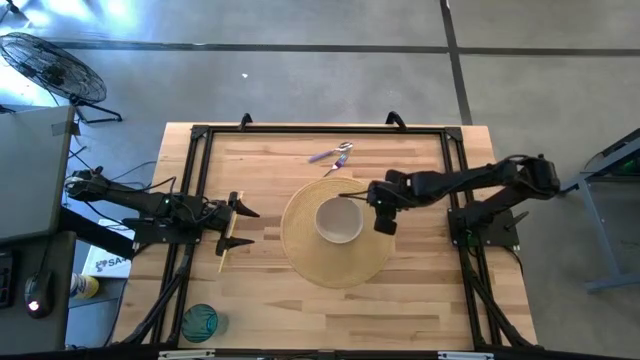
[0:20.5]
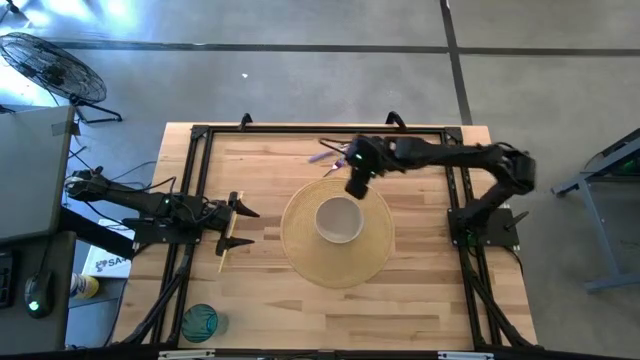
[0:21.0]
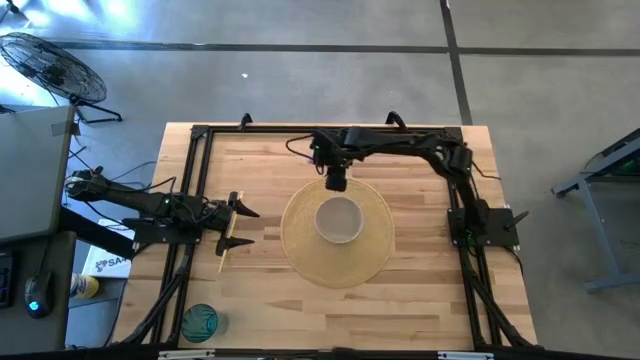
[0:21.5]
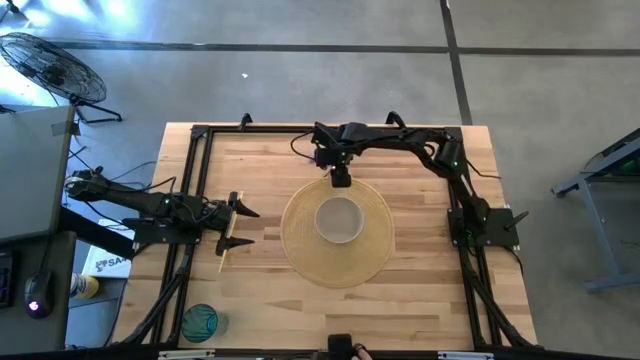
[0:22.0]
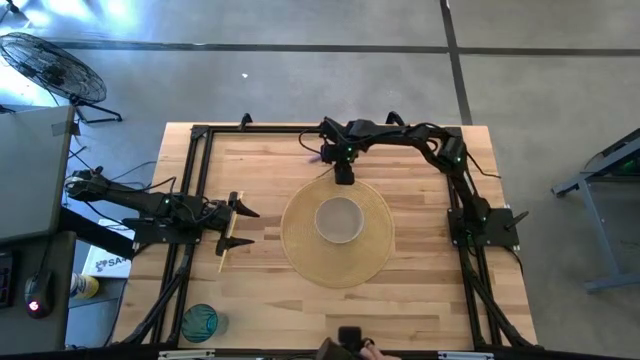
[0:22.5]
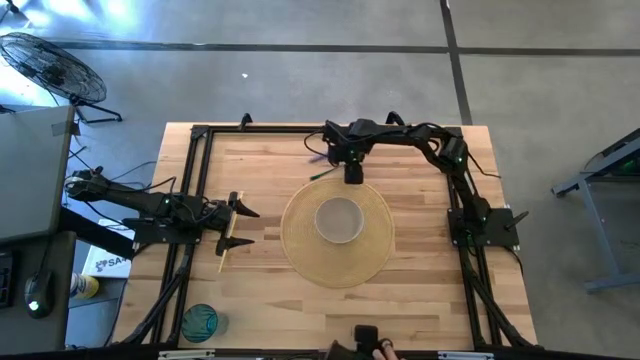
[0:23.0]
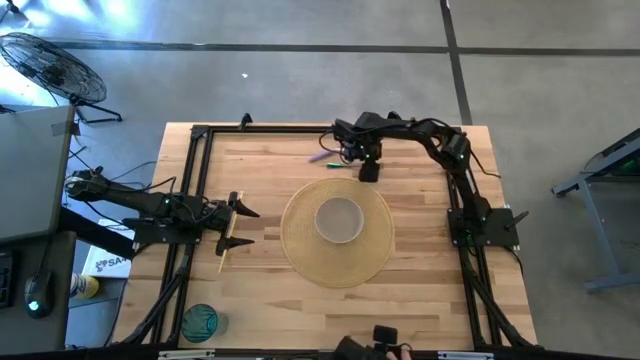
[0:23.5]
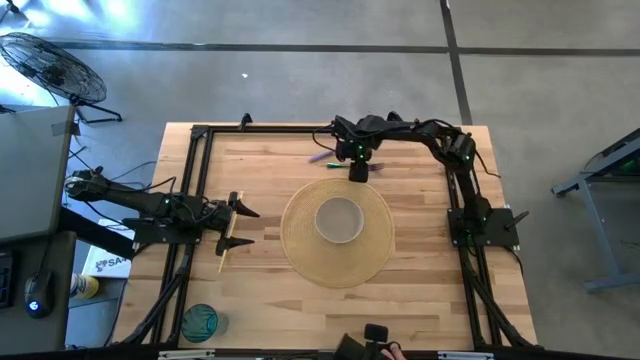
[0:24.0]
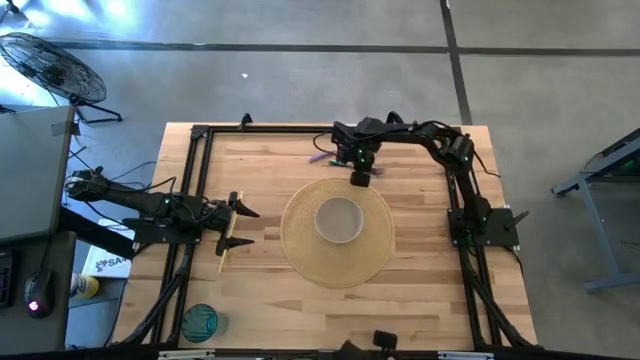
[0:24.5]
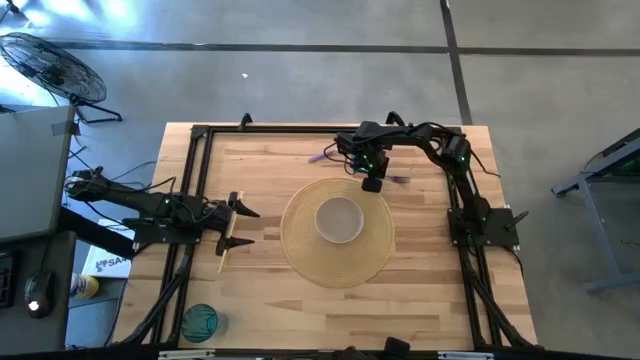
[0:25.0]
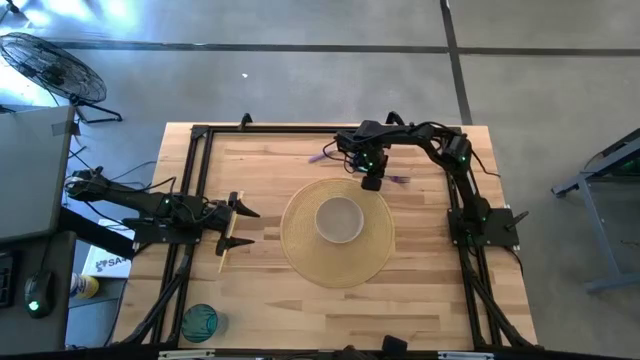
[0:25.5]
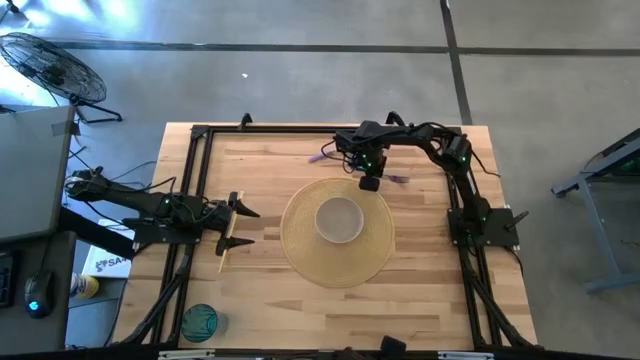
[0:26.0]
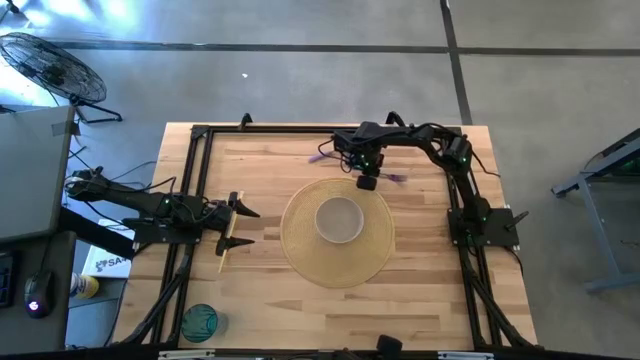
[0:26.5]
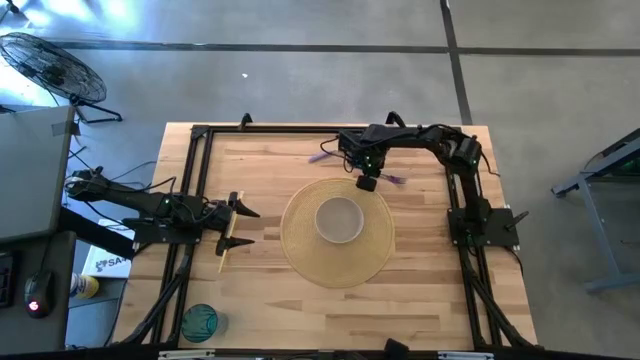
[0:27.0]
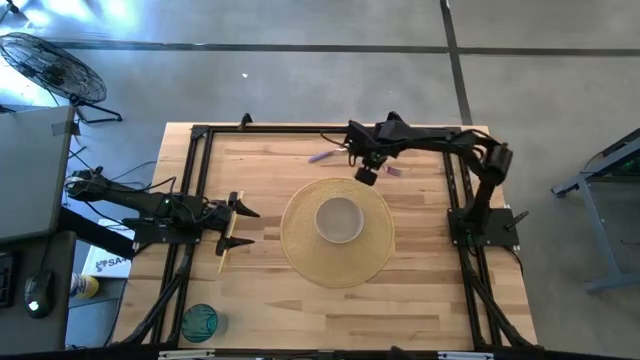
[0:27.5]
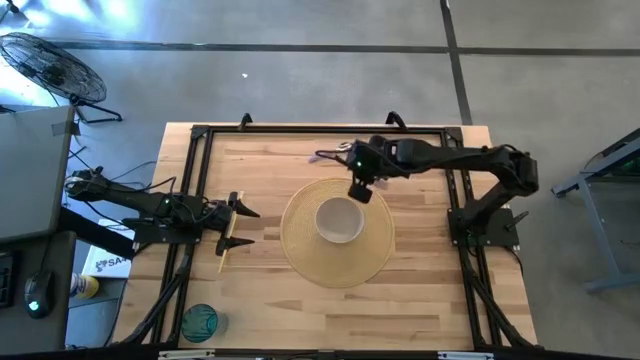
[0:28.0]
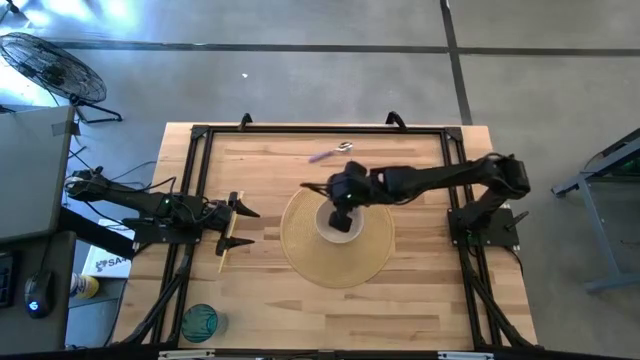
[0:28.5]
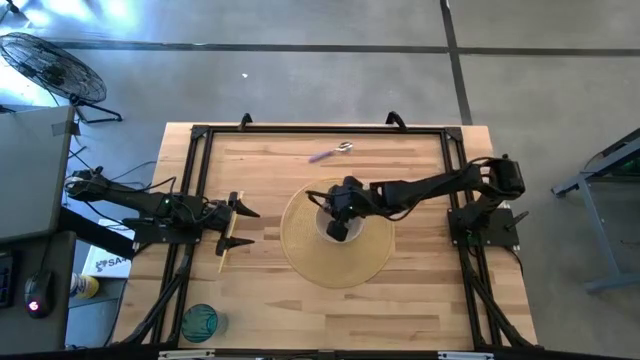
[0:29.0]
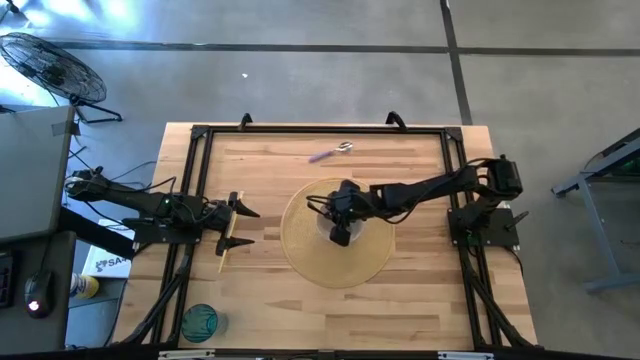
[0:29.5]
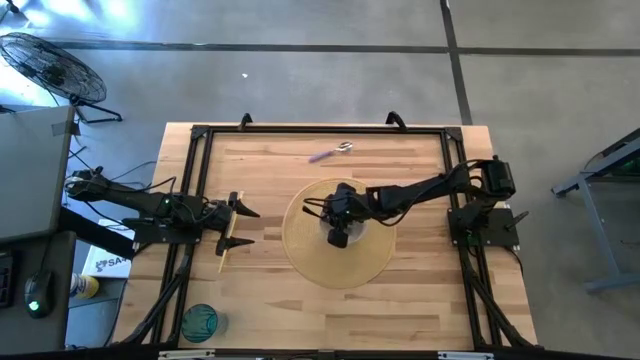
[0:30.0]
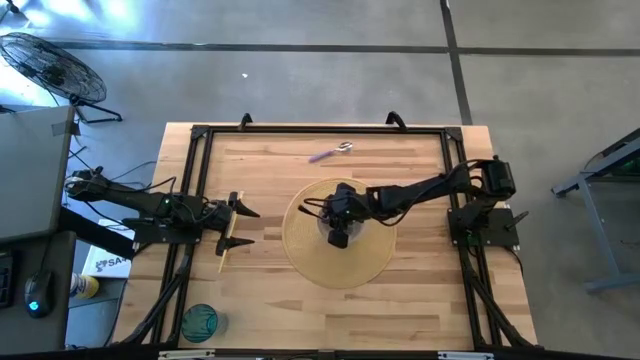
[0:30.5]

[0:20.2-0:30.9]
Task: Pick & Place Utensil
Put the blue fork into the white bowl on the table placemat

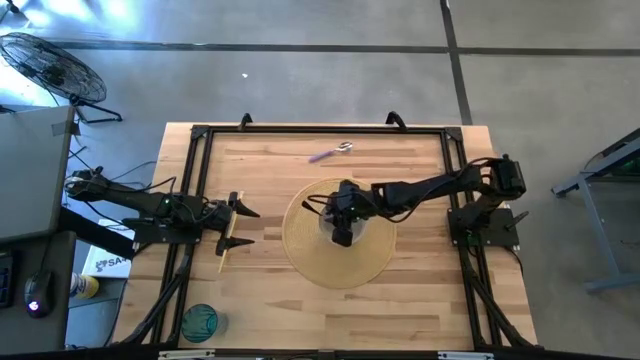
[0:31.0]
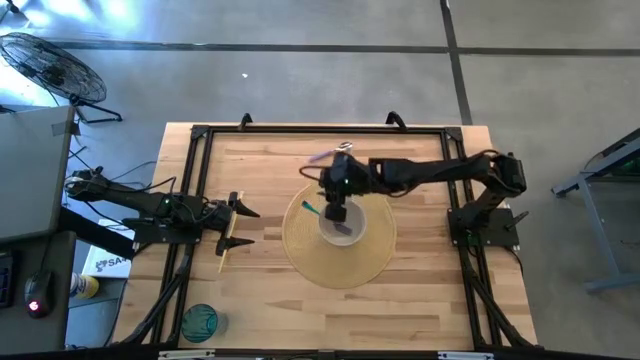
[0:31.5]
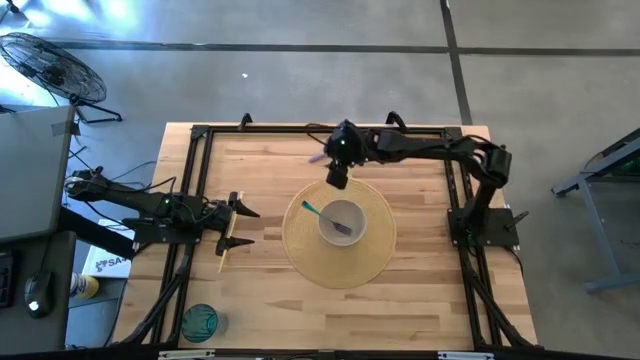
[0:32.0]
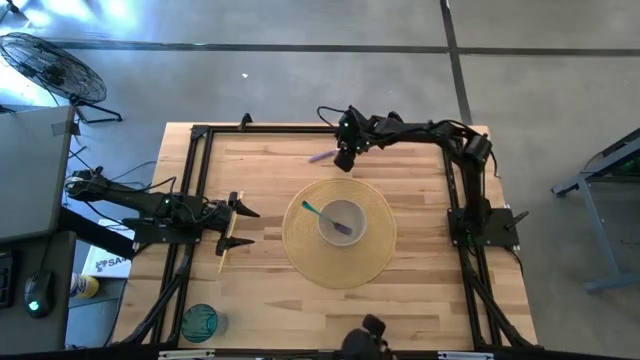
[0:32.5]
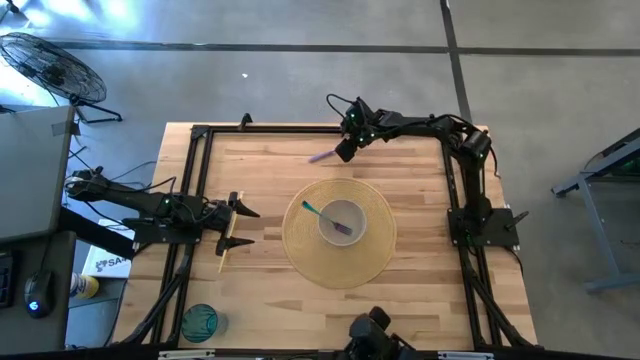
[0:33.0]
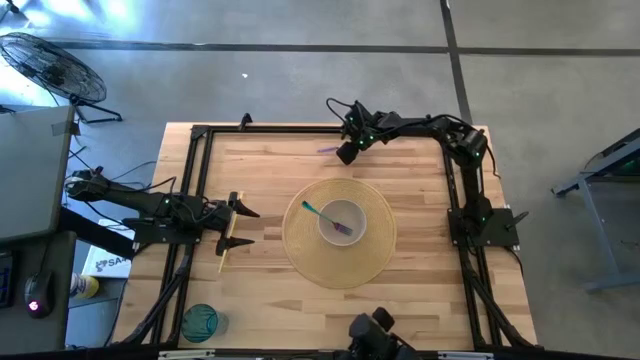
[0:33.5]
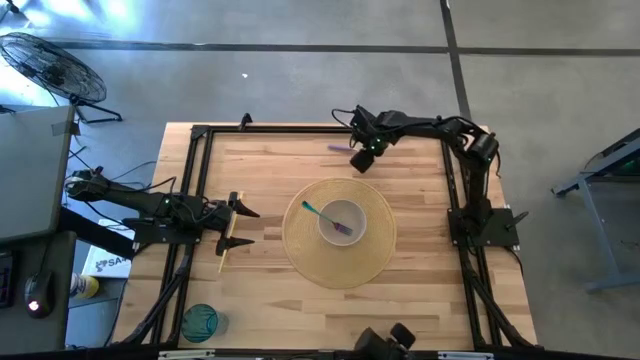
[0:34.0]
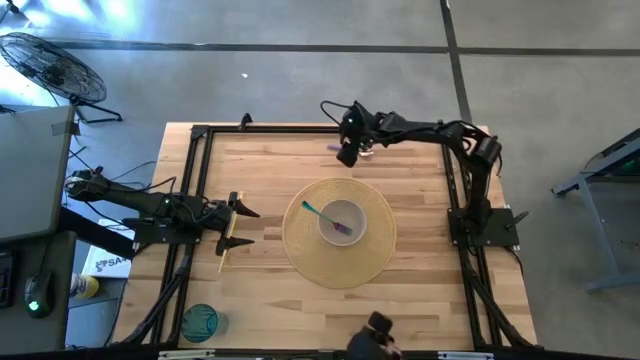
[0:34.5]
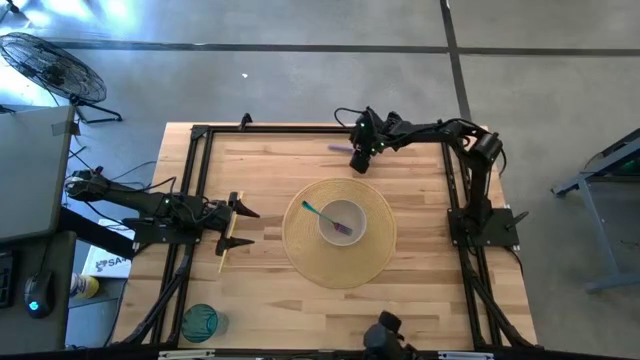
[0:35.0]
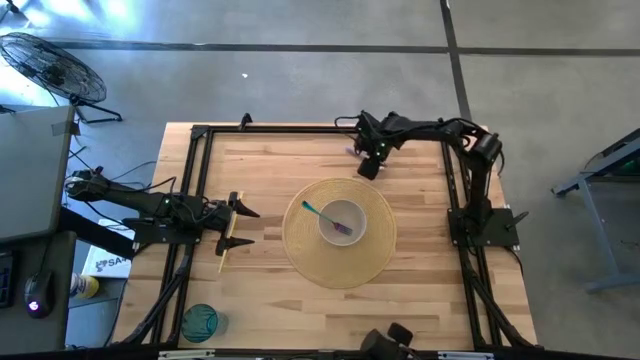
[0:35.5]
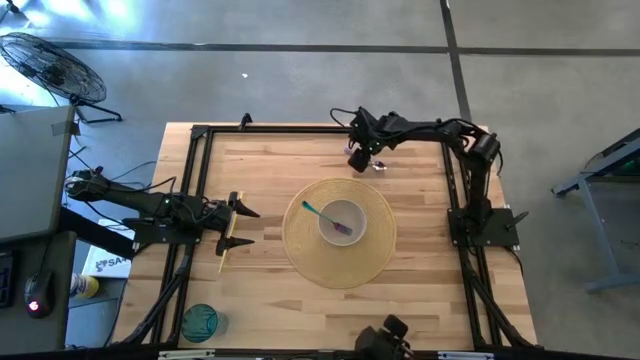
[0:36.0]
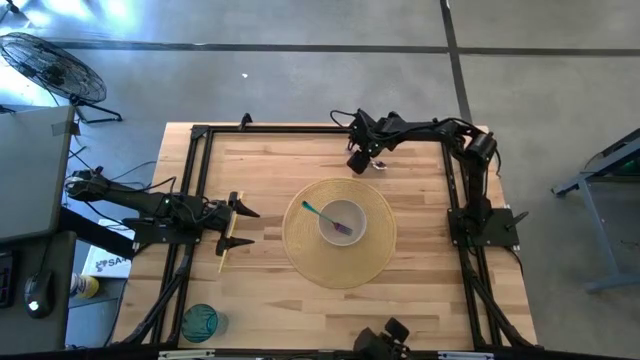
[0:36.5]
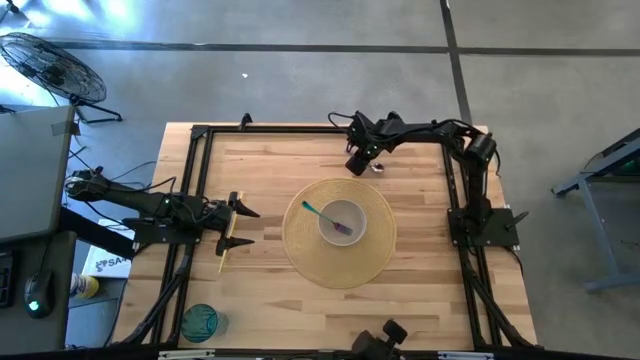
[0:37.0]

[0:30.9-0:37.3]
Put the purple spoon into the white bowl on the table placemat

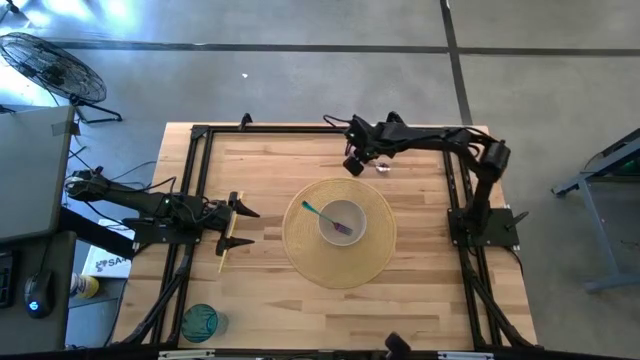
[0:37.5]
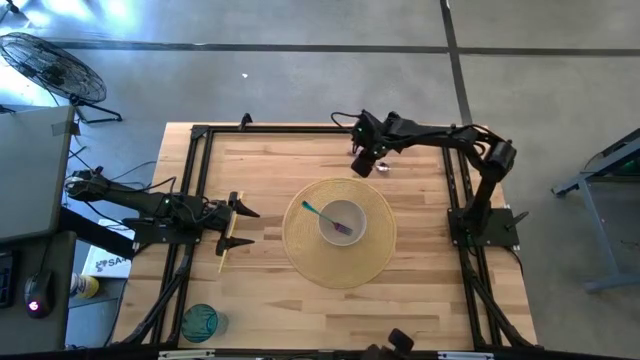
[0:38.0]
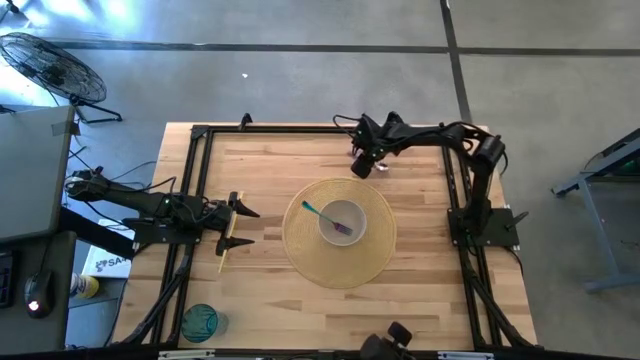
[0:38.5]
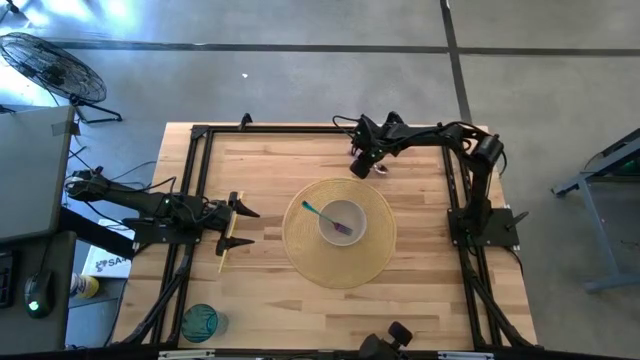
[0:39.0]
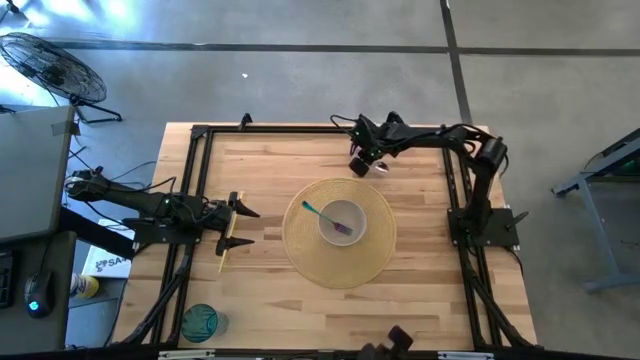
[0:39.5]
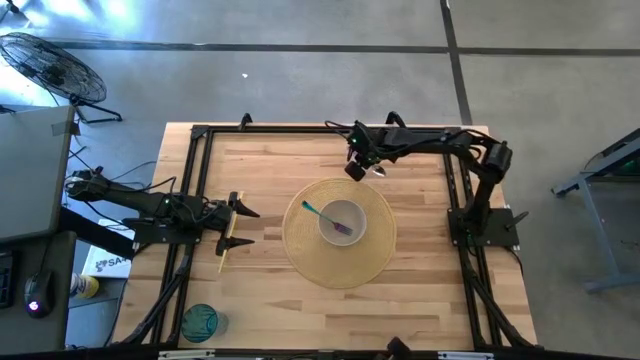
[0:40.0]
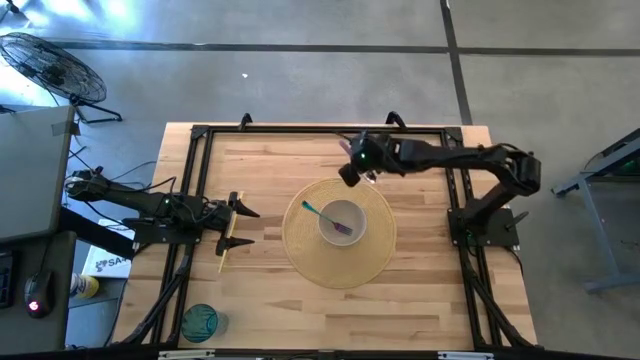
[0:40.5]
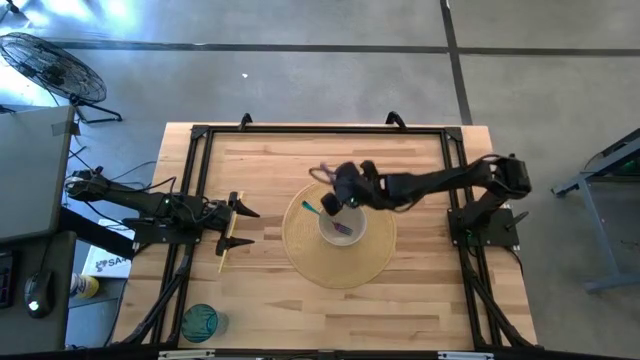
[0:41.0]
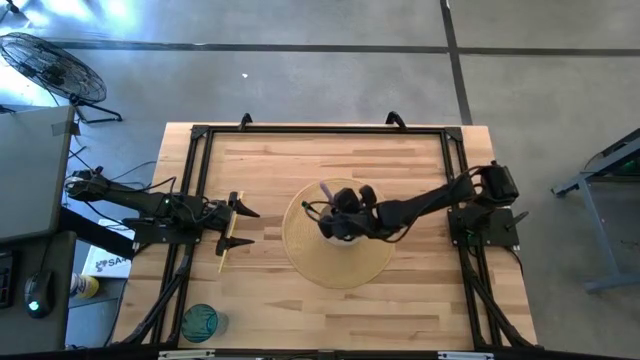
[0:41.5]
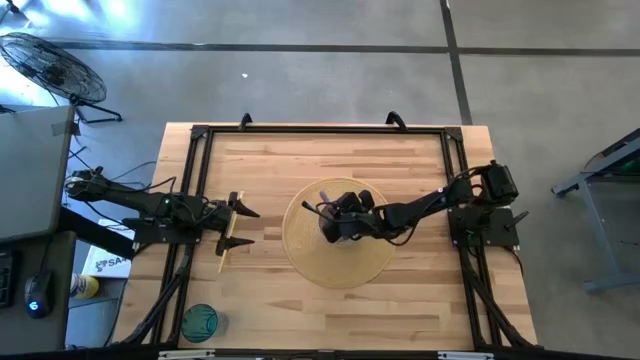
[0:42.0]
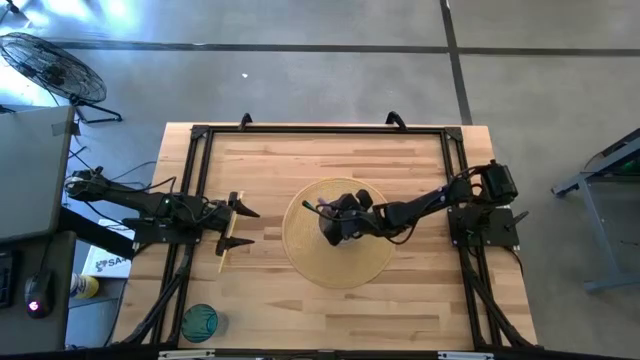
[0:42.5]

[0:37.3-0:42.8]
Put the purple spoon into the white bowl on the table placemat
